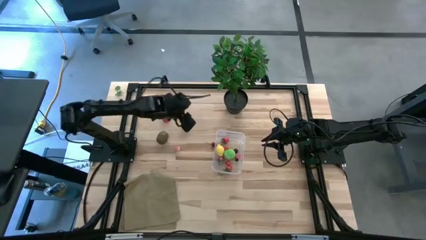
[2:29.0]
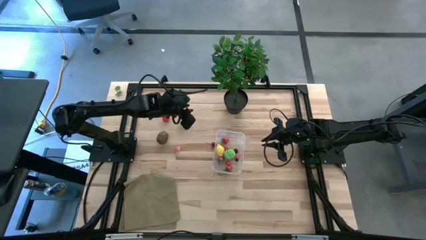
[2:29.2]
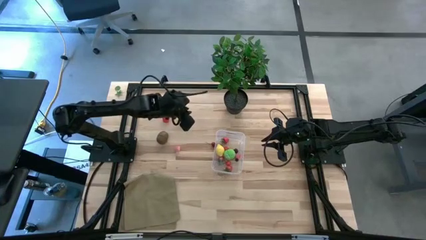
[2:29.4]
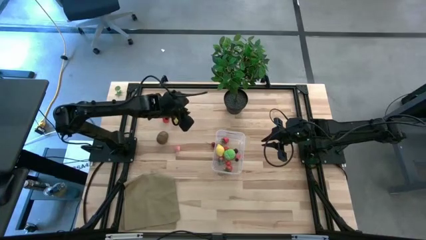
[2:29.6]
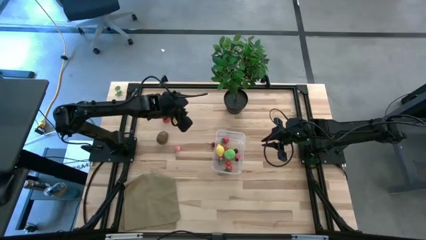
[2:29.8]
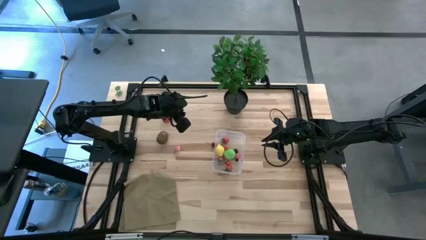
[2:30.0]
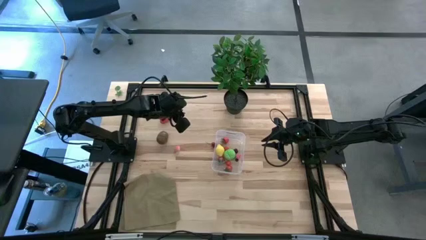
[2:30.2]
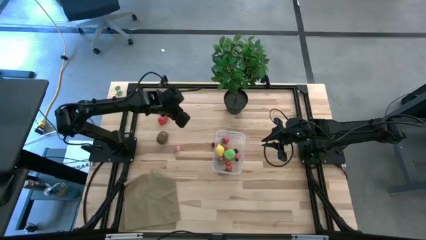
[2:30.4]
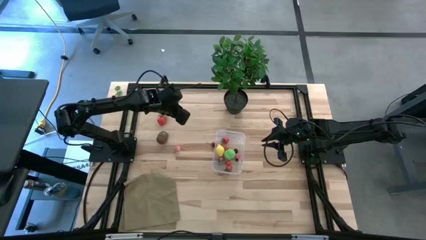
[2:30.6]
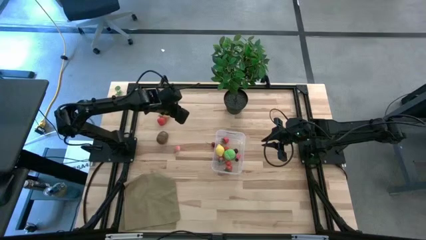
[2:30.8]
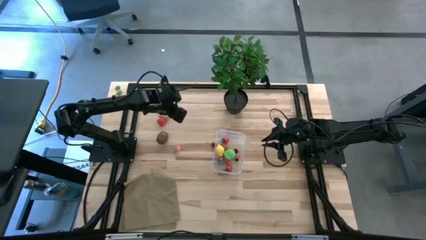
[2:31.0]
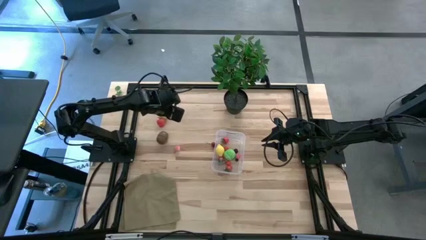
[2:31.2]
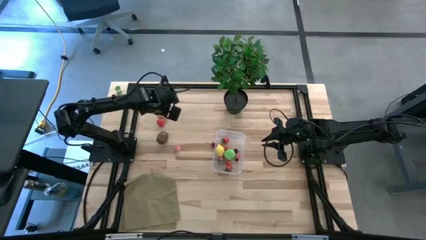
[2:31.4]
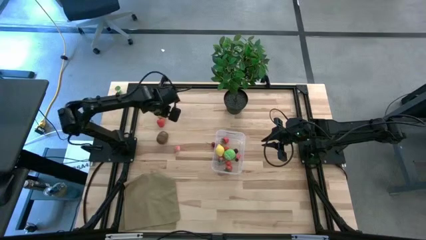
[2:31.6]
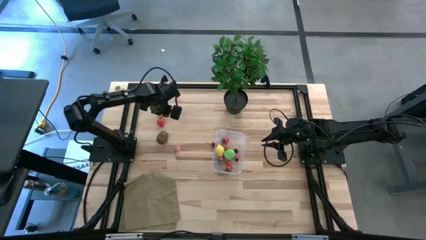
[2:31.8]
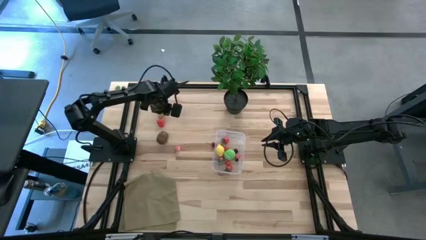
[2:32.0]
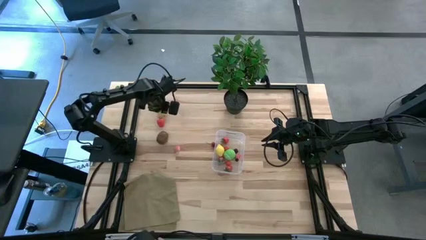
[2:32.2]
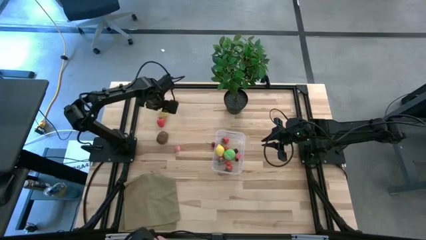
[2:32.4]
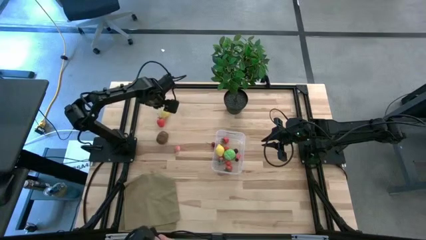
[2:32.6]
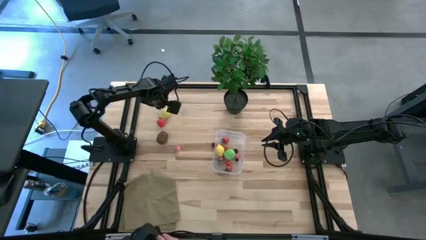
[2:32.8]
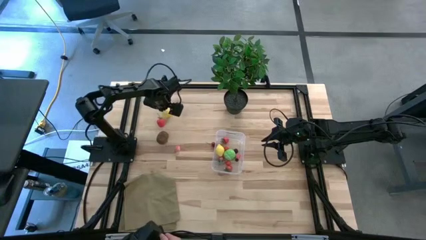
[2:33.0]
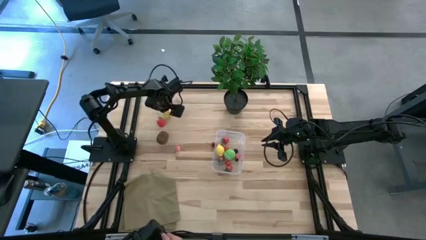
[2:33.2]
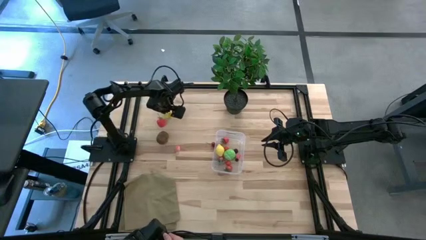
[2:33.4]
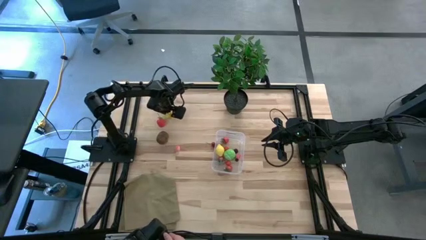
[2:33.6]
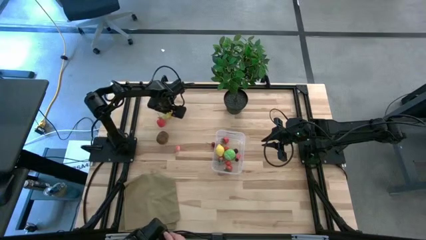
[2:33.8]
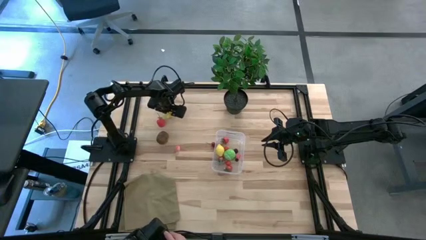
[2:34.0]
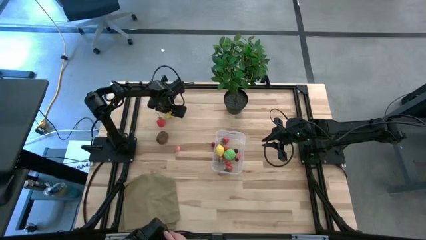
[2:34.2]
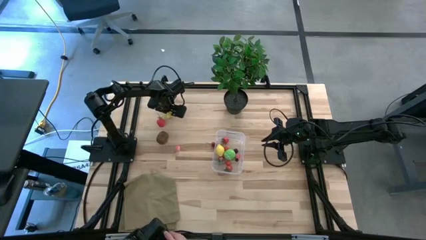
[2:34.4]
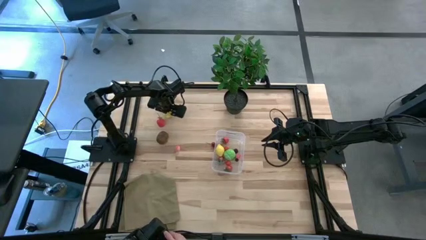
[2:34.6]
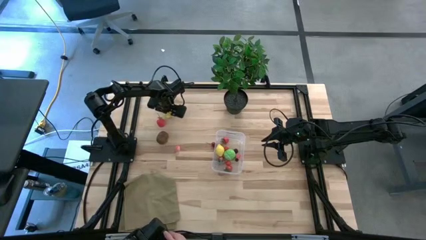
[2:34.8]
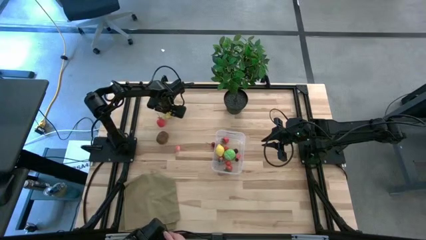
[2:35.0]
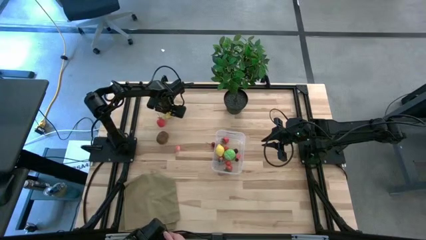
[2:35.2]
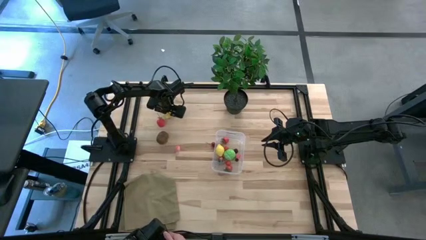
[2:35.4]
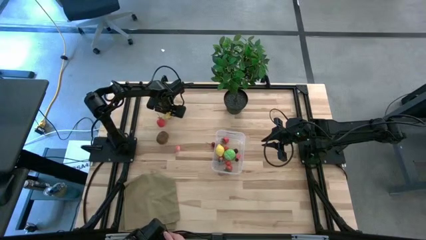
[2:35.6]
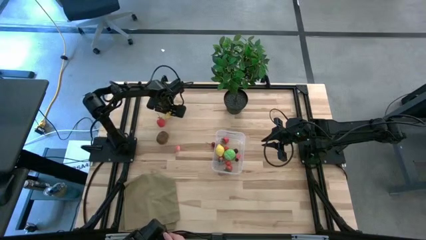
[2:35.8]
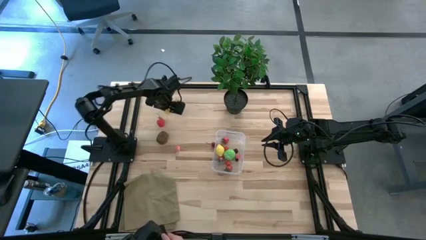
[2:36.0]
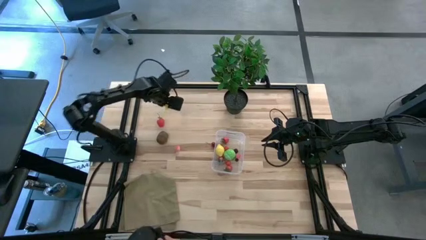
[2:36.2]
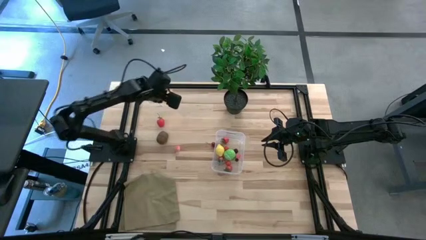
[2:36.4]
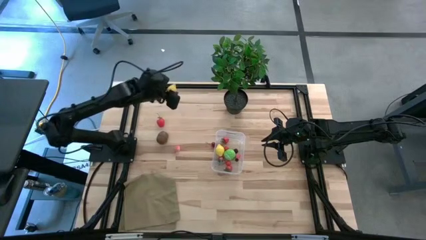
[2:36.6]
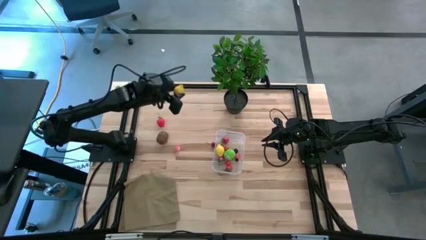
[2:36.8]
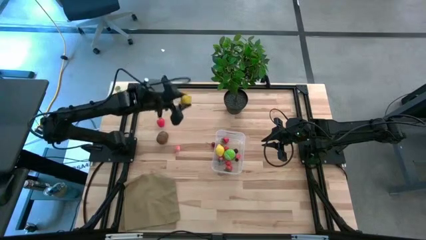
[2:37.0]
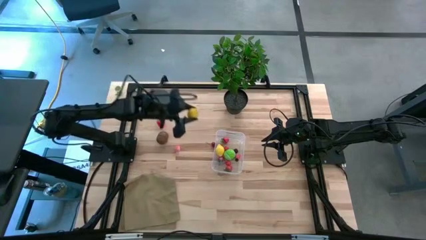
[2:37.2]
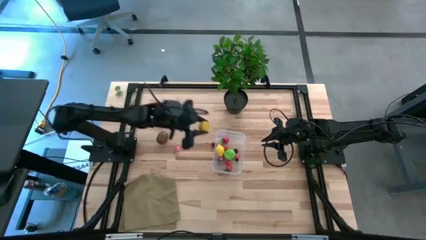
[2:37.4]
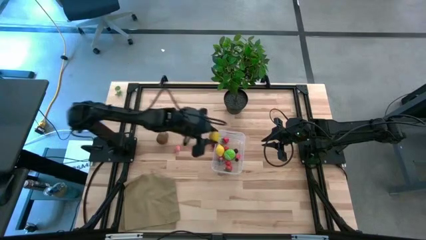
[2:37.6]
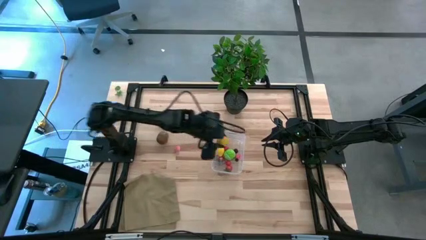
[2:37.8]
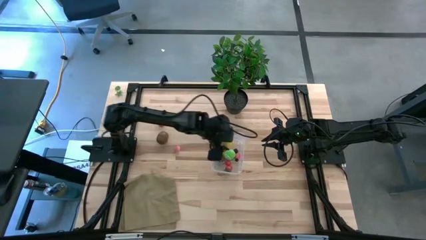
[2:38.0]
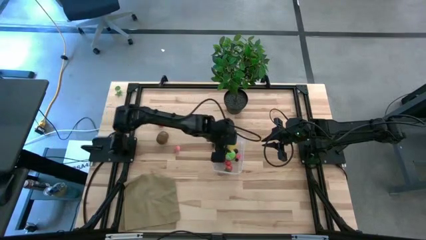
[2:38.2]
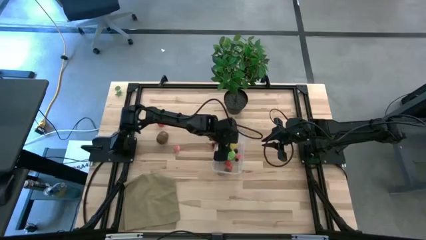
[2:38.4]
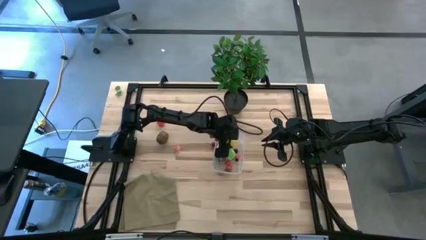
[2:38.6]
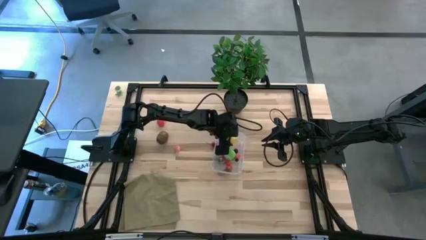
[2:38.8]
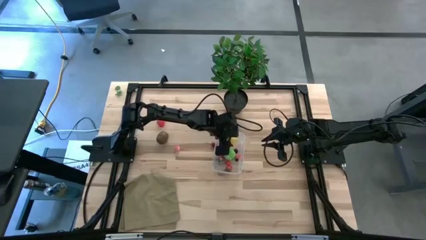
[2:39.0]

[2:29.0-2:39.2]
Task: Pick and placing Produce into tupperware
Put the lemon into the transparent container

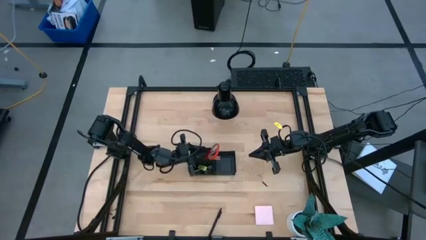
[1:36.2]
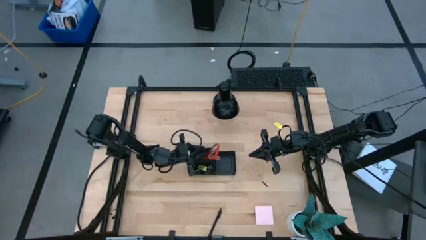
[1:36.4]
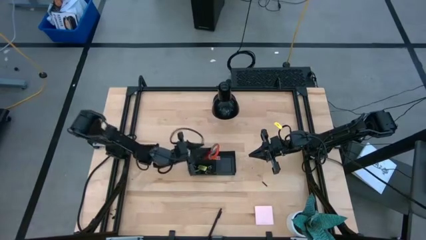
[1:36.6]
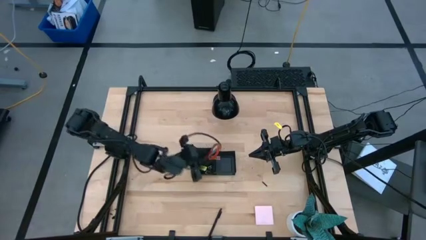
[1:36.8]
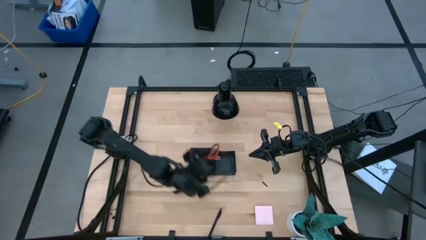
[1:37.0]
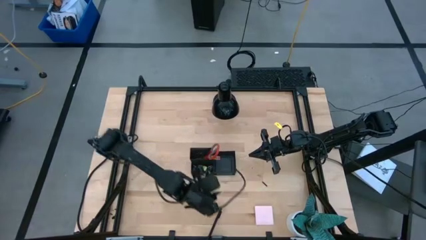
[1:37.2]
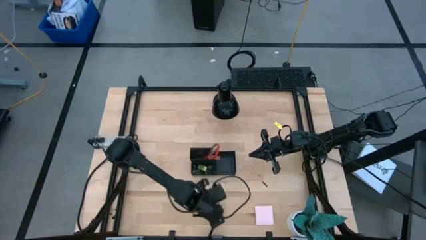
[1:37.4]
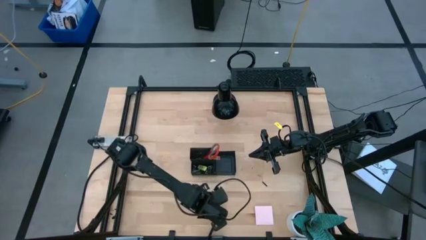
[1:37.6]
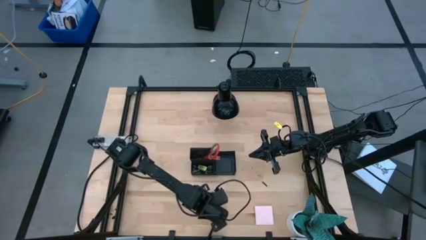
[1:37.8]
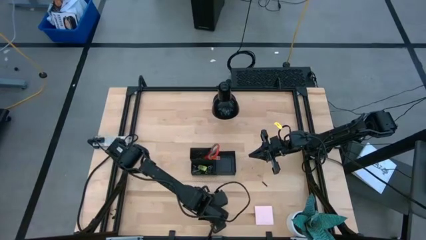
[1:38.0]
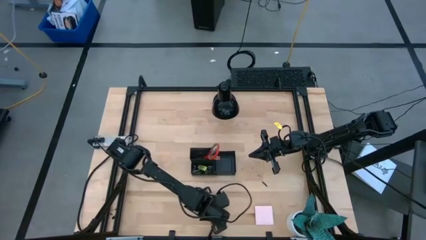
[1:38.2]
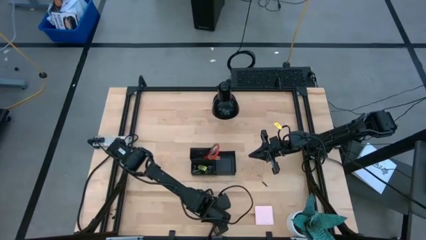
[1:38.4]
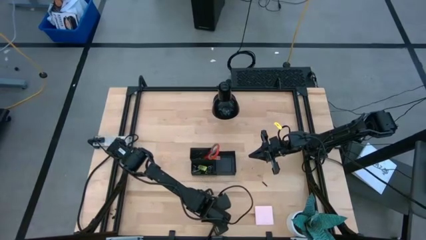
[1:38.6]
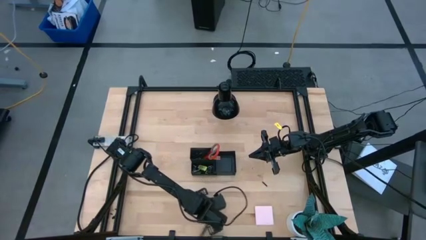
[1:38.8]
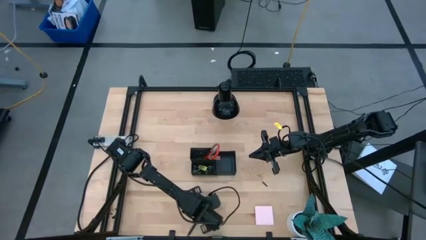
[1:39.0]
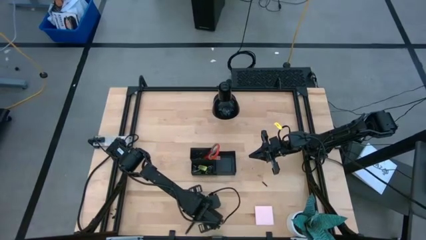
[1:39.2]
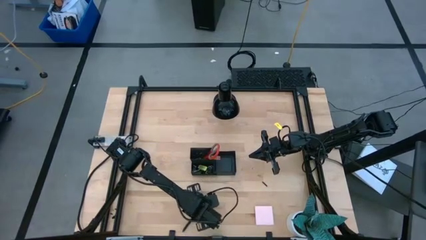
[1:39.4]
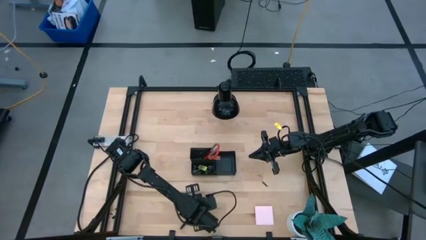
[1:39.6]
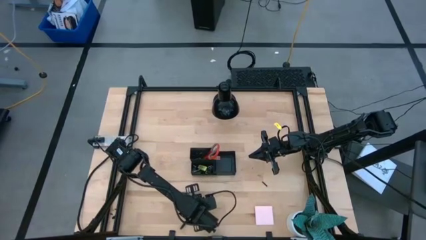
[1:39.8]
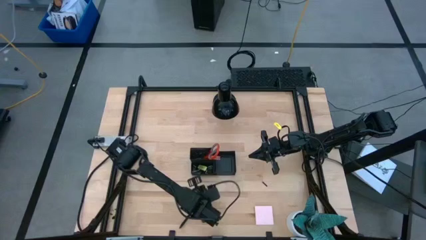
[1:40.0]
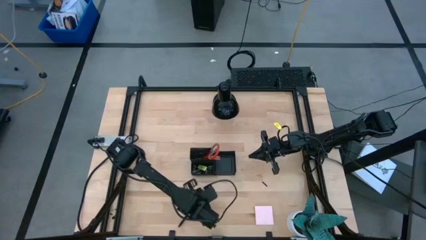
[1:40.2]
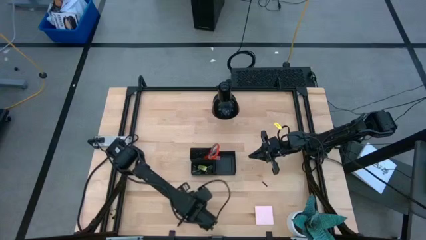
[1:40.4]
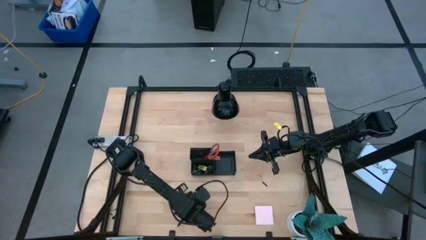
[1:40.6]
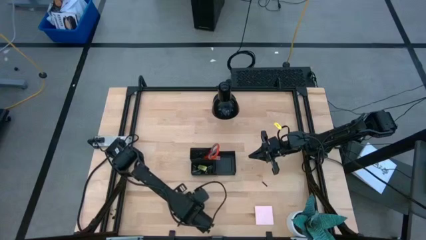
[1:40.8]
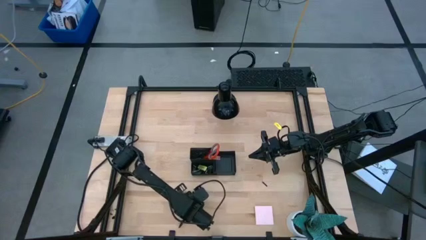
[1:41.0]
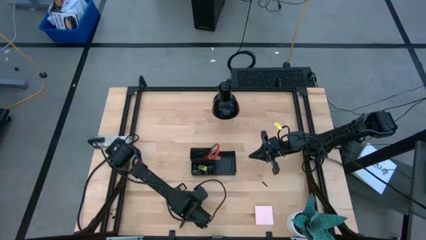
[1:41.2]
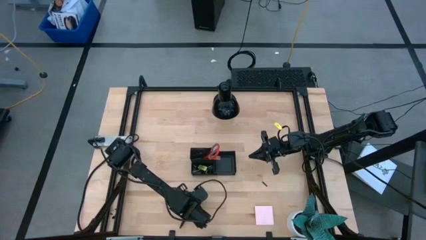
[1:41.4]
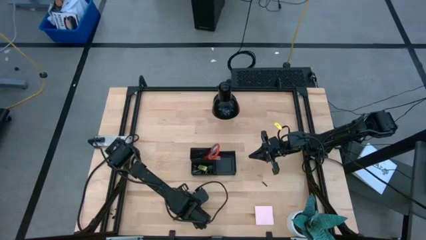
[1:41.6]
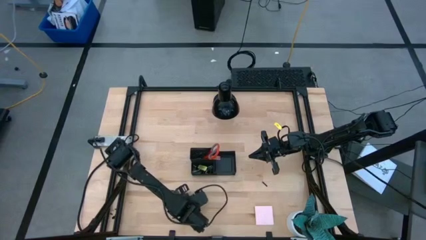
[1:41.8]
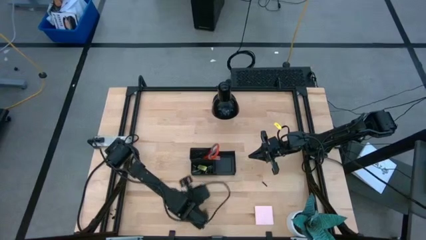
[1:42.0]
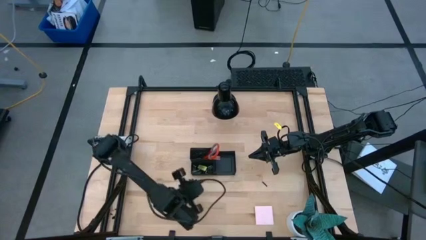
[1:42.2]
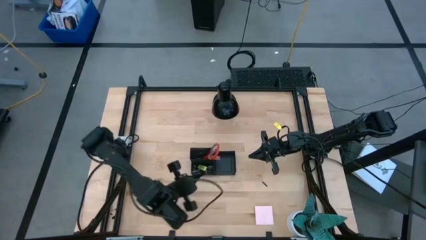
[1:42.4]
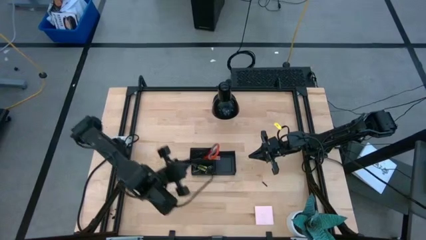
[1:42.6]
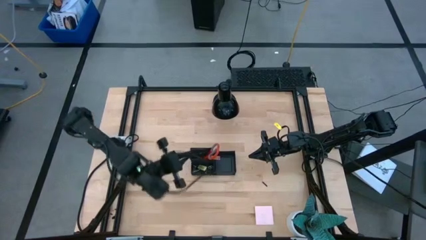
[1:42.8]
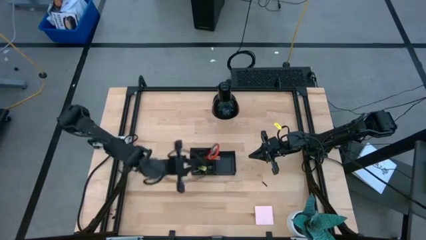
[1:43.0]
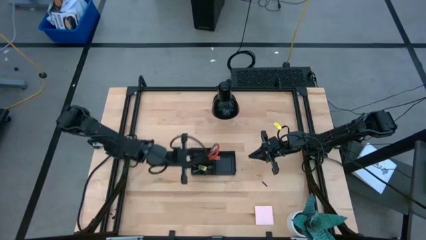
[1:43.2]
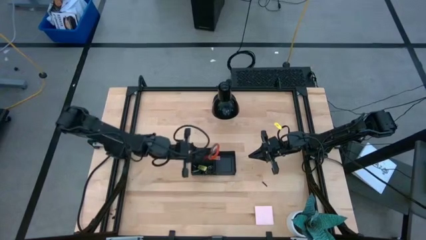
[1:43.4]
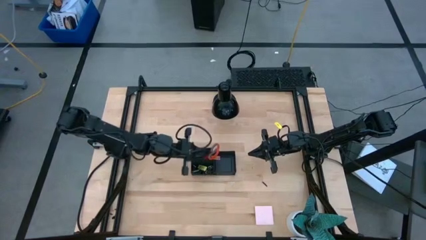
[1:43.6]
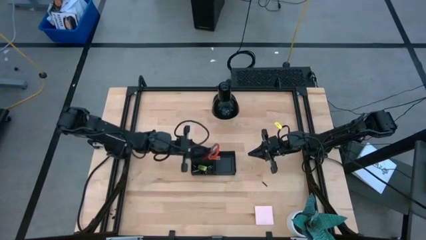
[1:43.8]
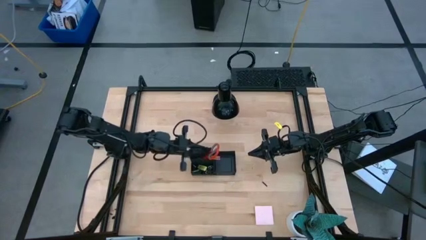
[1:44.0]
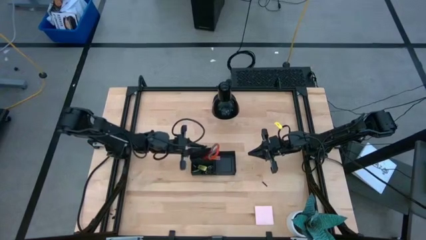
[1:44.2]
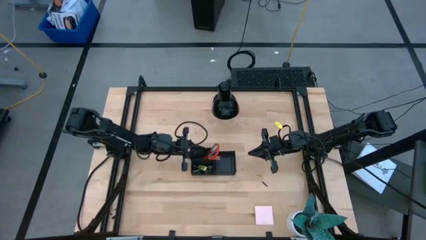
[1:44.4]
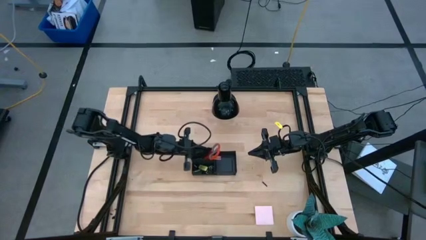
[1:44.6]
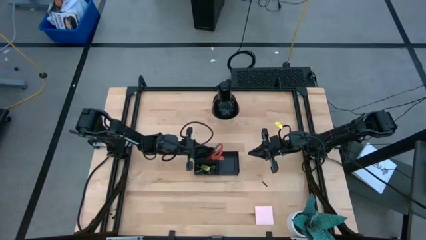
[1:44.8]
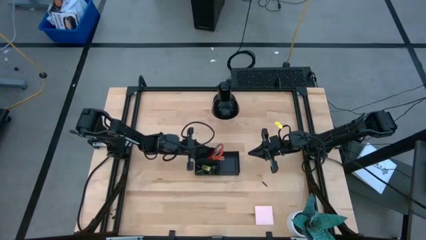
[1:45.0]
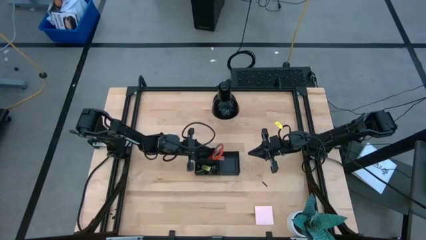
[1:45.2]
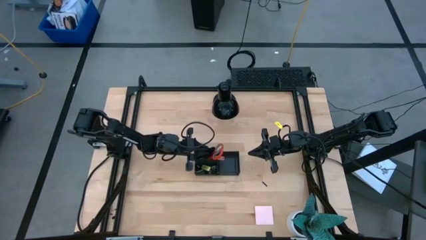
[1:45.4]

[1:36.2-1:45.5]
Task: Pick and place office supplies into organizer
Put the pen into the top left section of the desk organizer
